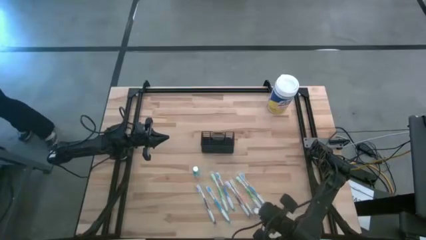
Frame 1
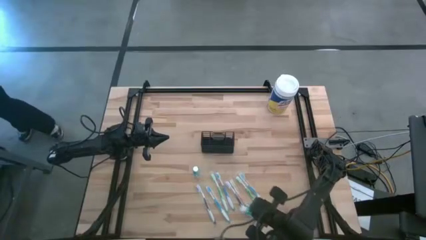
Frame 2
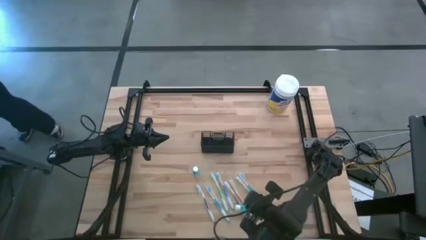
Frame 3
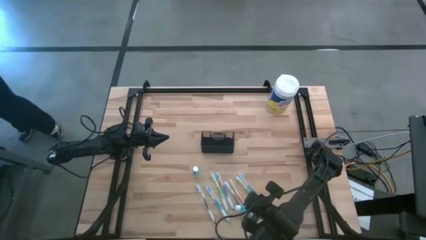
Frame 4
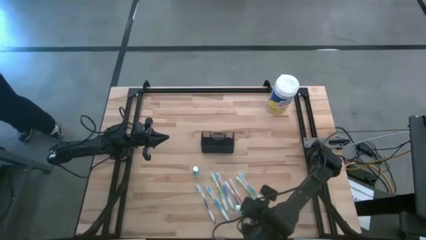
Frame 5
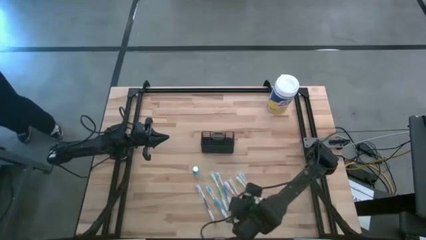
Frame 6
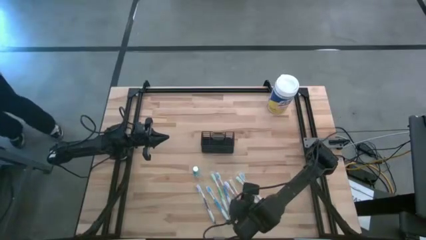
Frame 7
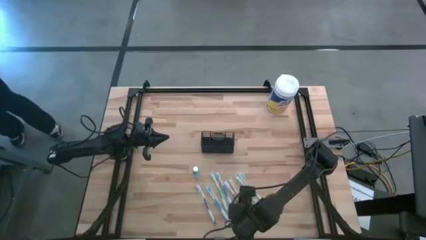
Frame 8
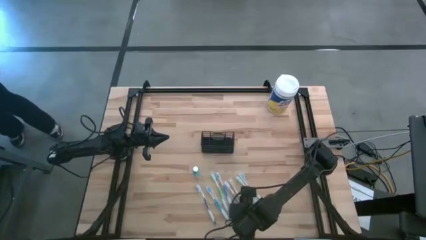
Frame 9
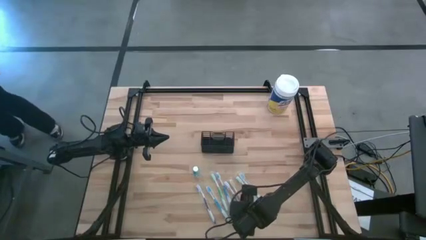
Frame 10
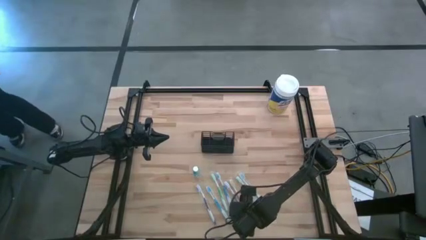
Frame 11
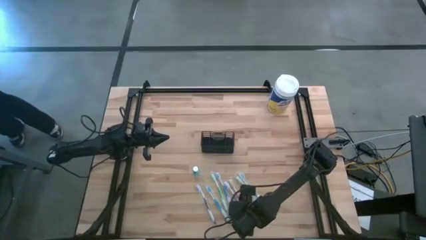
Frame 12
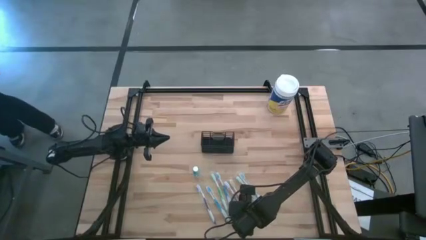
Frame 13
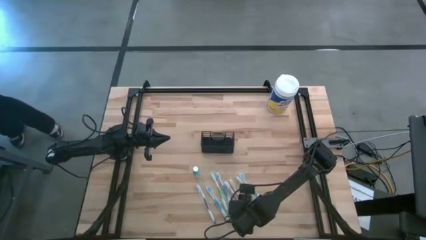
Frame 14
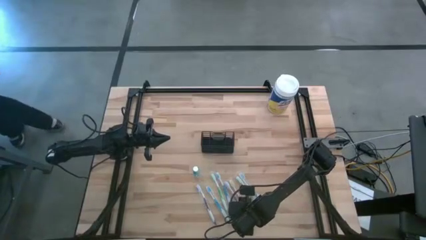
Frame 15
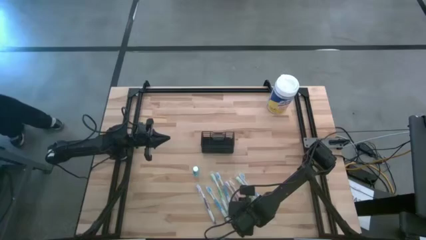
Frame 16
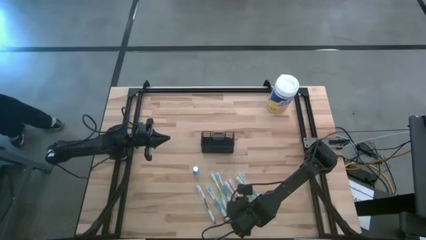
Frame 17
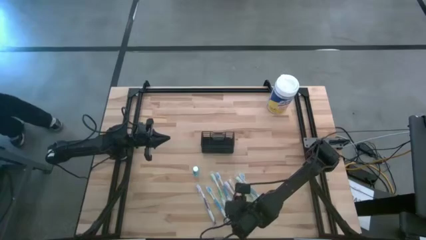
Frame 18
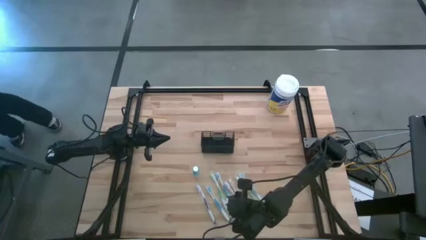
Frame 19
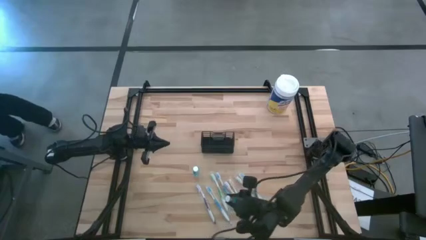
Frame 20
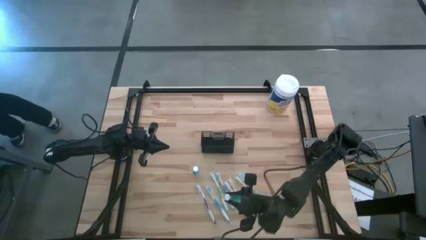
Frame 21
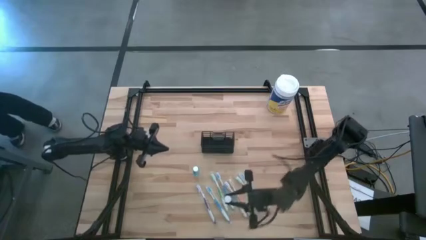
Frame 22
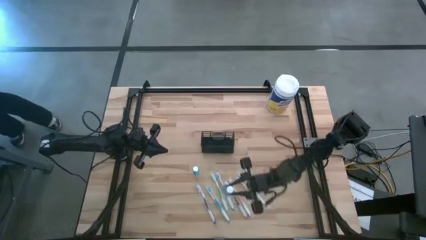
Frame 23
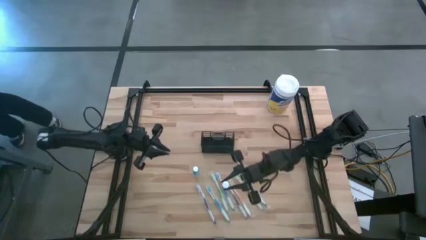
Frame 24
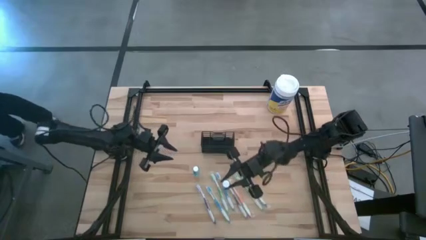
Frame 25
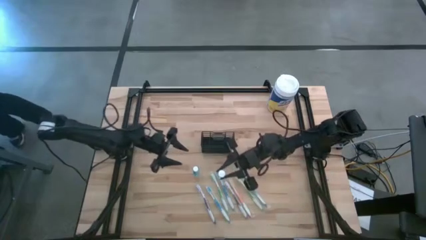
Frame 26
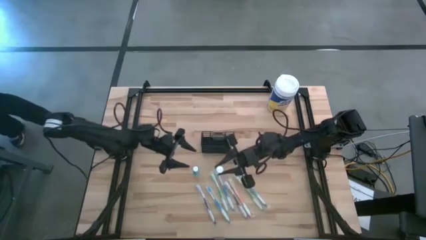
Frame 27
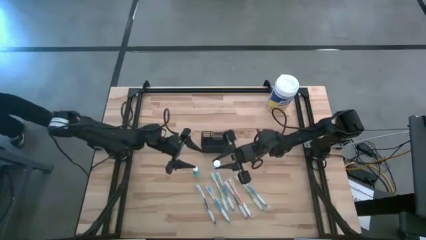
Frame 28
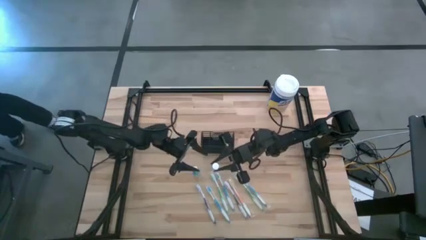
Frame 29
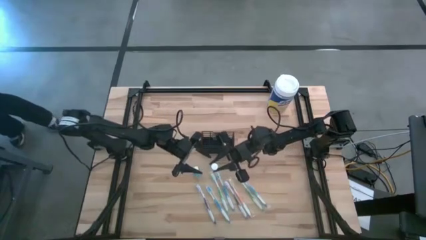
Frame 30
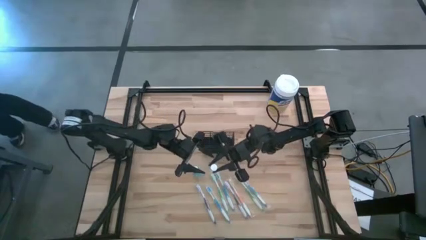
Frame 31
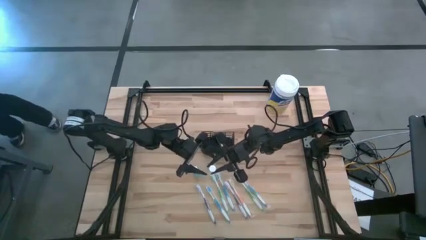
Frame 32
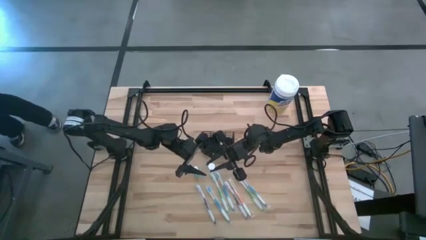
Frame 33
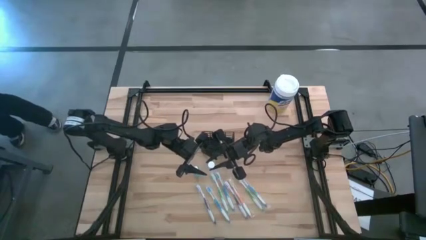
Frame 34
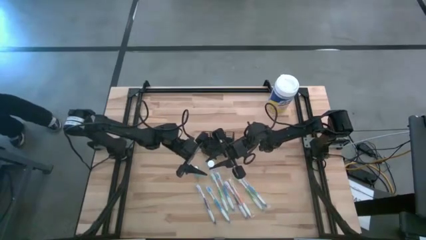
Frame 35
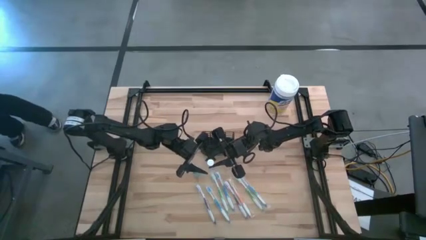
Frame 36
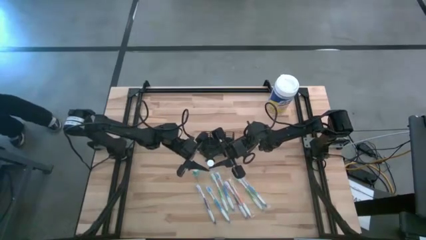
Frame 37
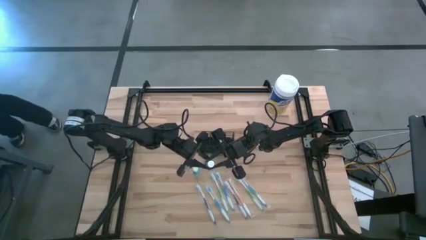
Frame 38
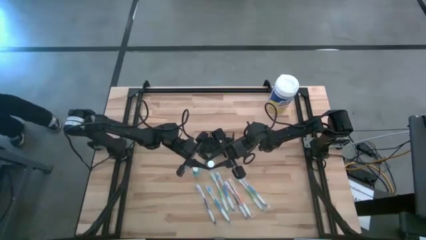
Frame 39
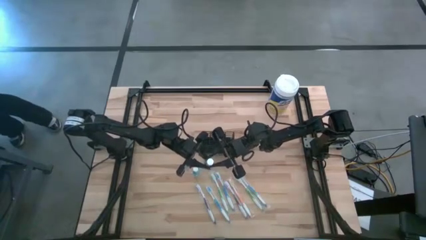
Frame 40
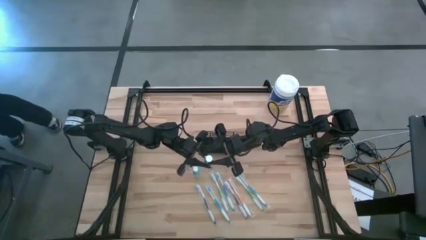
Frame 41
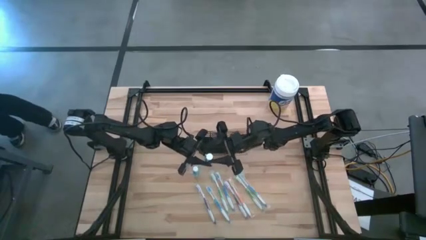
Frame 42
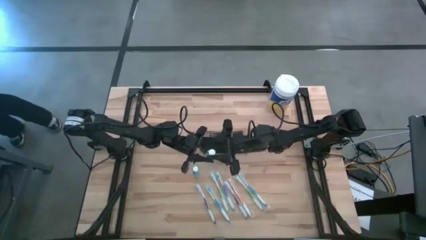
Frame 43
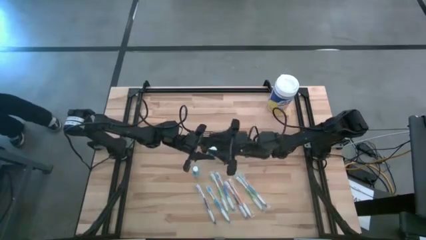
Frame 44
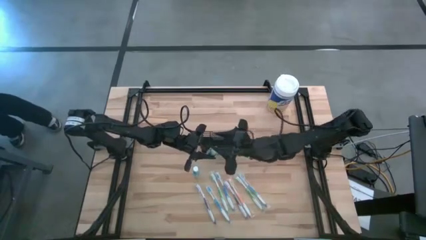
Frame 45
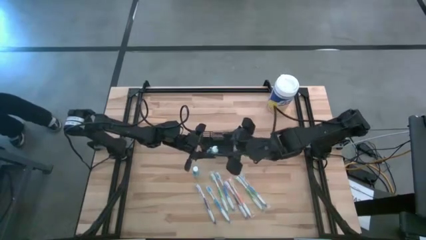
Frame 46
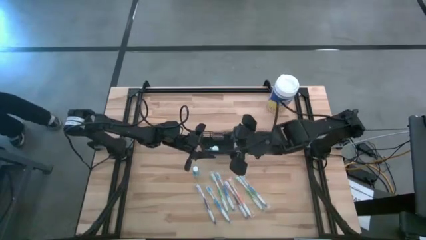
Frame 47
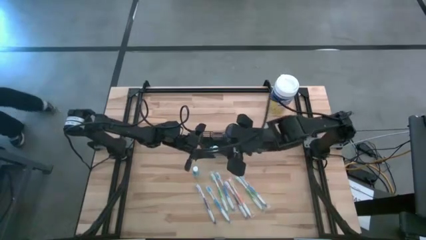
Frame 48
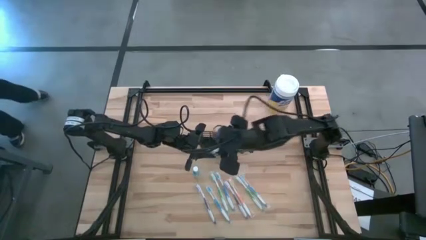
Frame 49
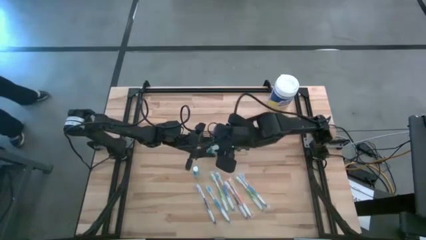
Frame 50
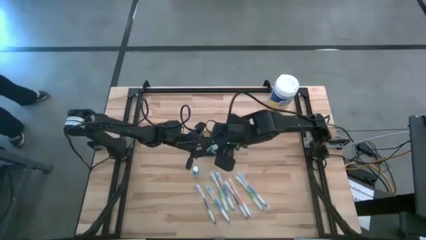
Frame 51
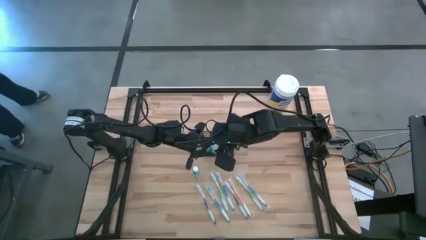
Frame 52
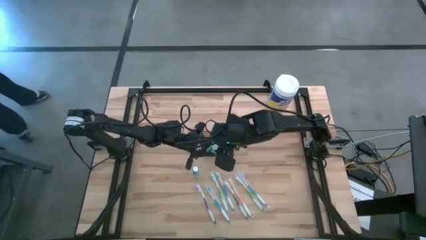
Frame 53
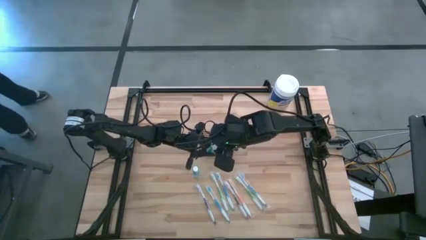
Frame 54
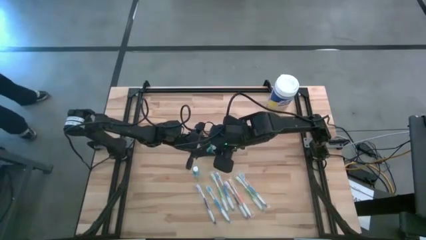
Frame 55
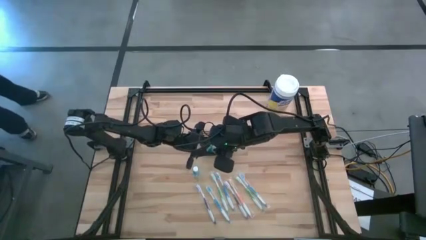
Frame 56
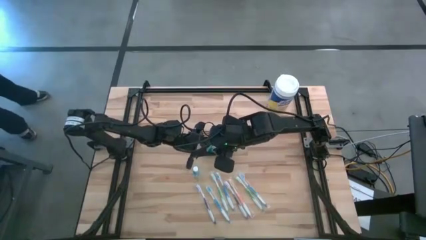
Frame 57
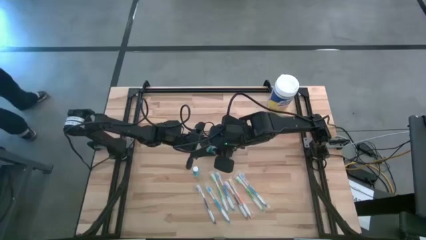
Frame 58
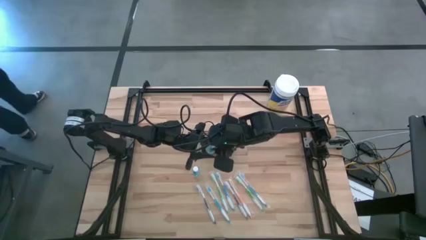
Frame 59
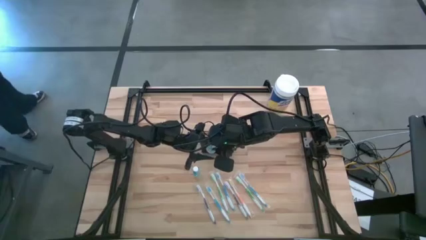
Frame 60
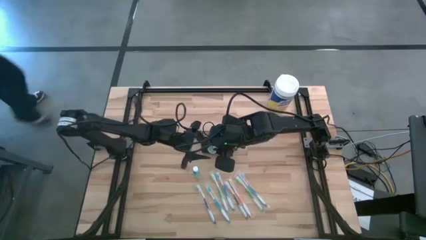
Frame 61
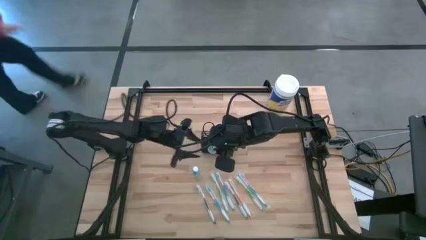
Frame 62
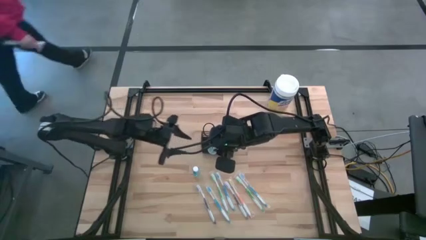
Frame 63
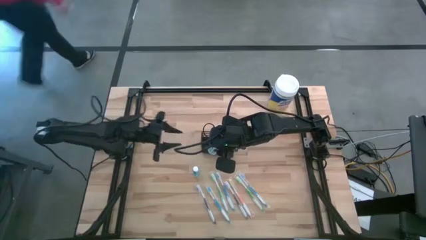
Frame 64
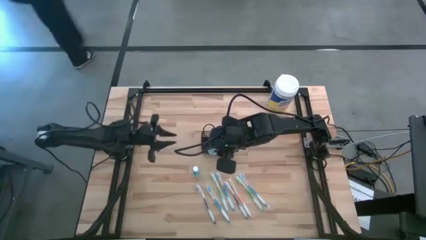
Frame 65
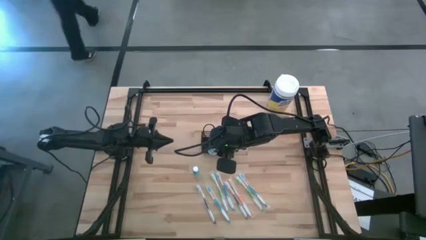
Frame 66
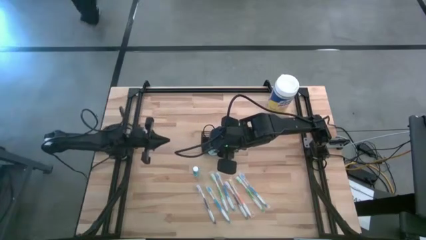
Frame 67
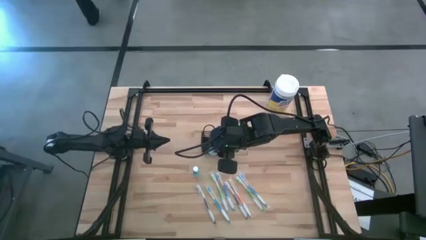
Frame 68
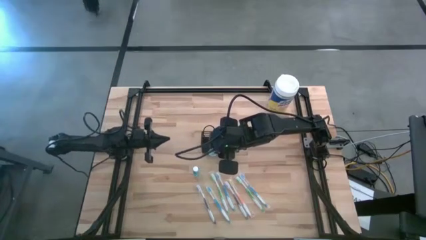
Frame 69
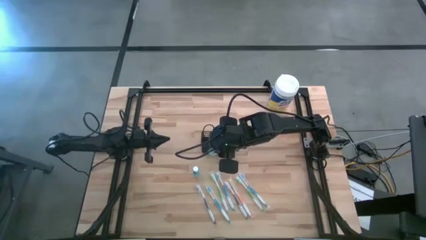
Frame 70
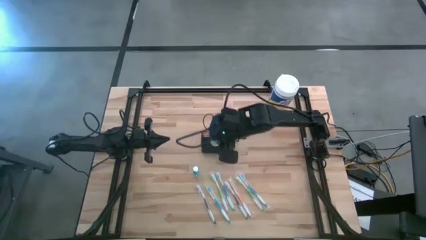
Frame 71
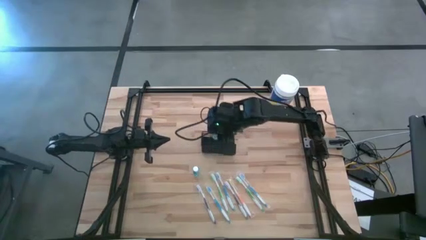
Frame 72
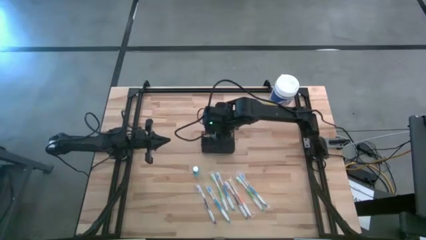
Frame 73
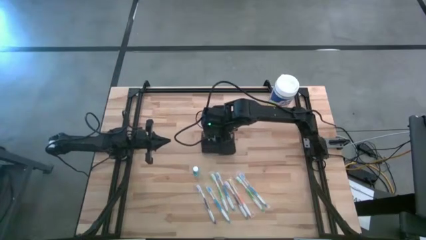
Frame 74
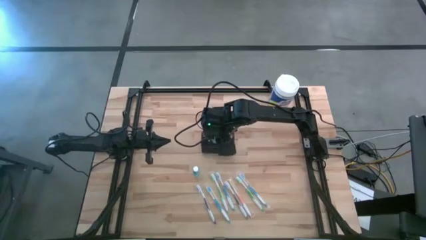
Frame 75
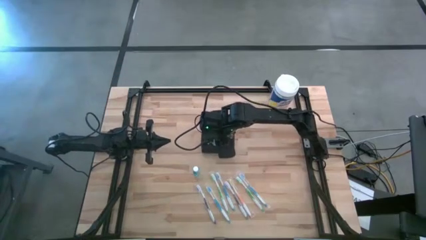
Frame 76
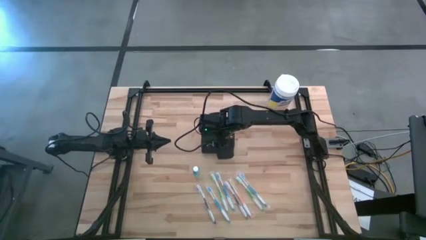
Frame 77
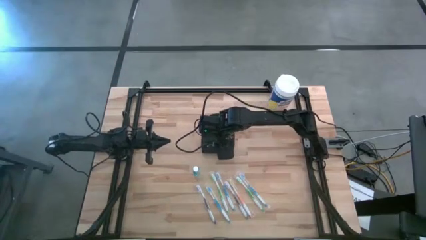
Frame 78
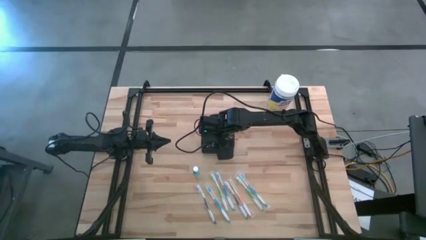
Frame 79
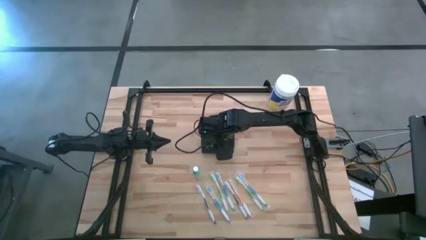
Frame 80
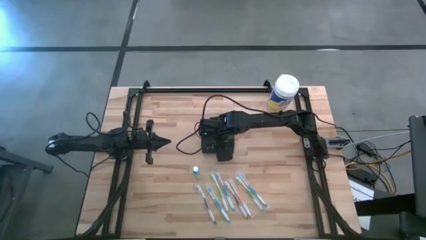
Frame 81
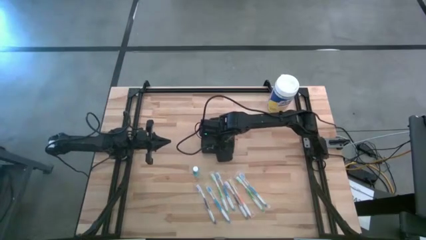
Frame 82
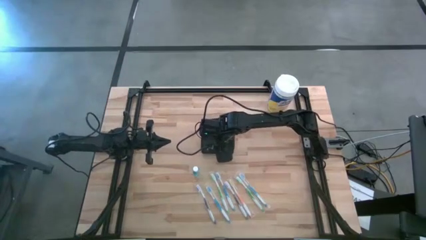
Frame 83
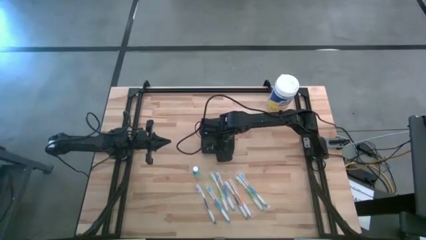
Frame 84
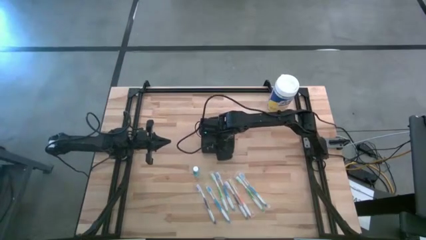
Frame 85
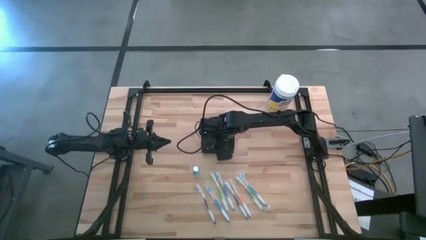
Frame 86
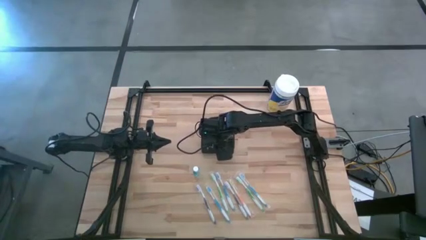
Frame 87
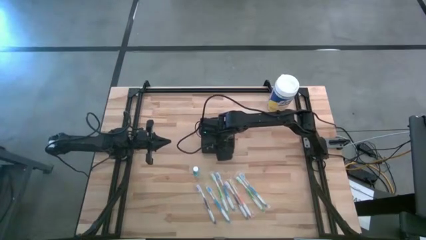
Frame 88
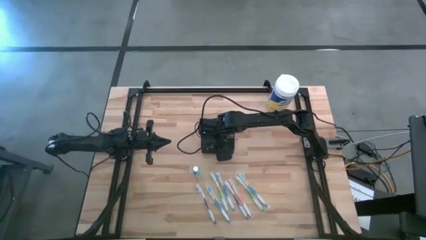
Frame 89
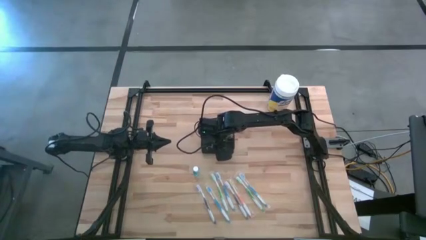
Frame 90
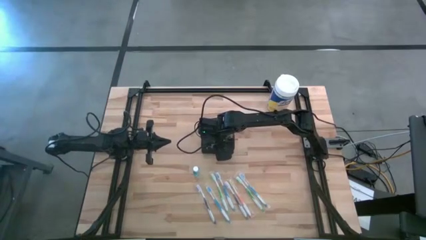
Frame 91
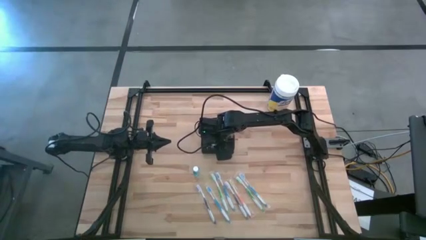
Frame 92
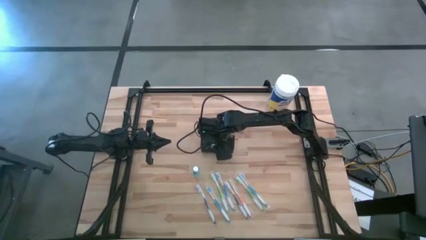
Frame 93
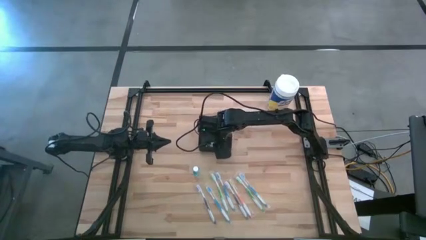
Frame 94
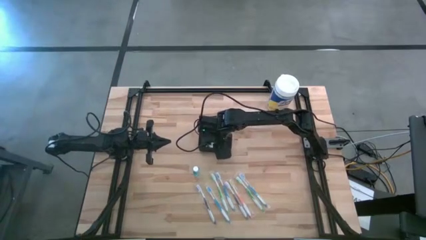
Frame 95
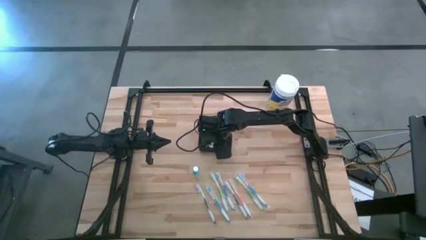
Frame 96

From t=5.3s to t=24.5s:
Task: Pick & Place toothbrushing station
Put the bottom blue mouthwash bottle into the black wire organizer
